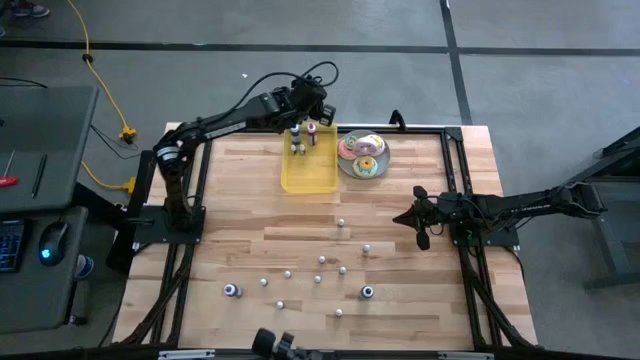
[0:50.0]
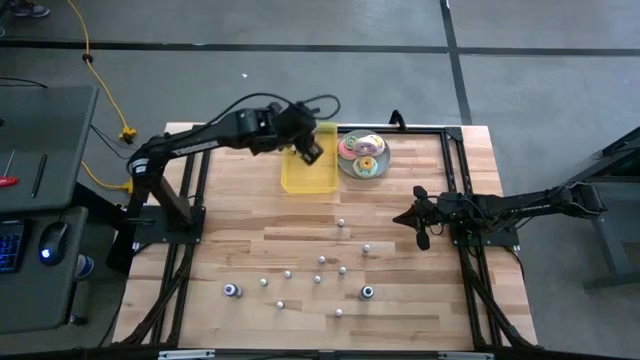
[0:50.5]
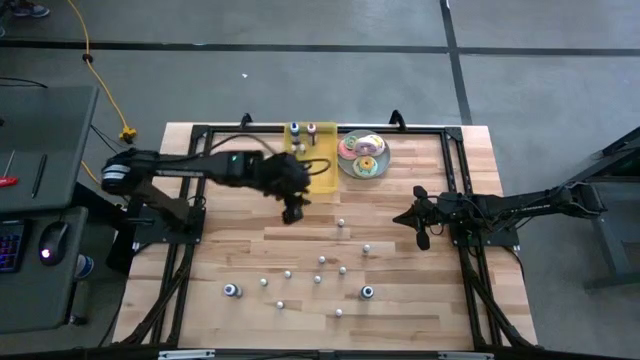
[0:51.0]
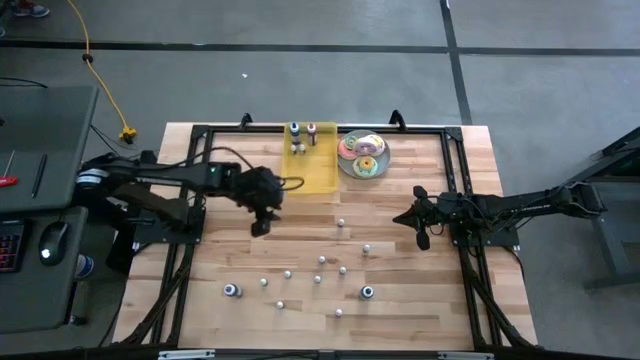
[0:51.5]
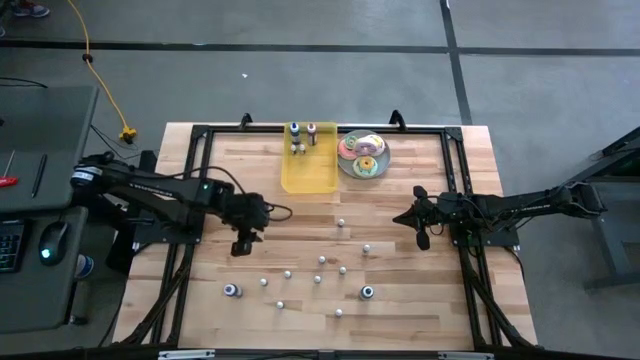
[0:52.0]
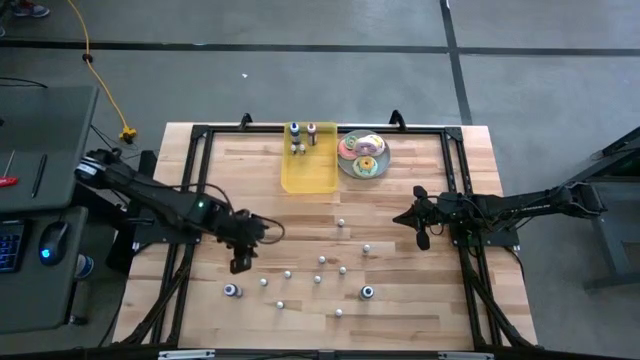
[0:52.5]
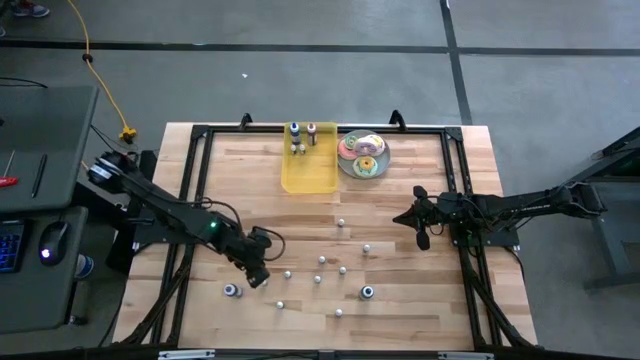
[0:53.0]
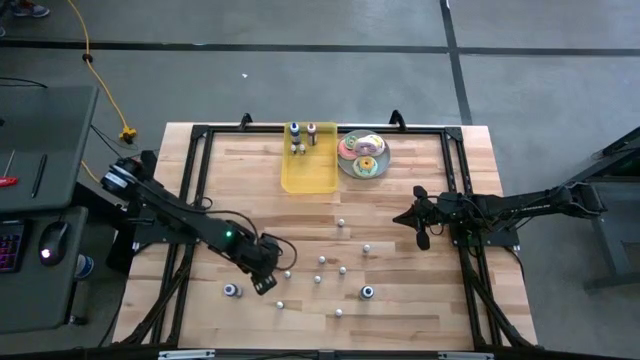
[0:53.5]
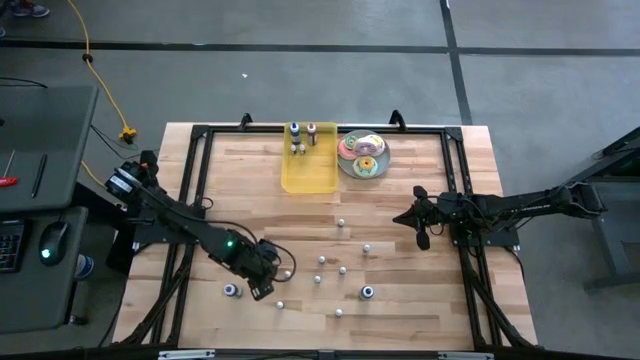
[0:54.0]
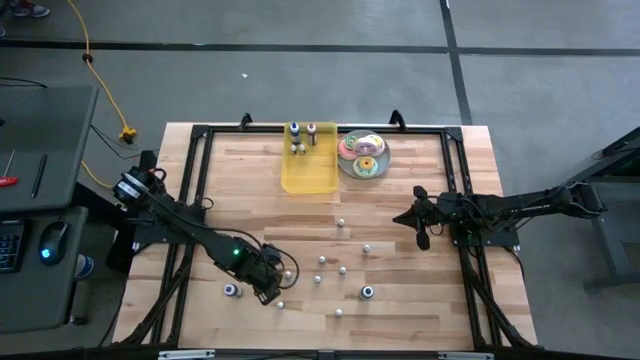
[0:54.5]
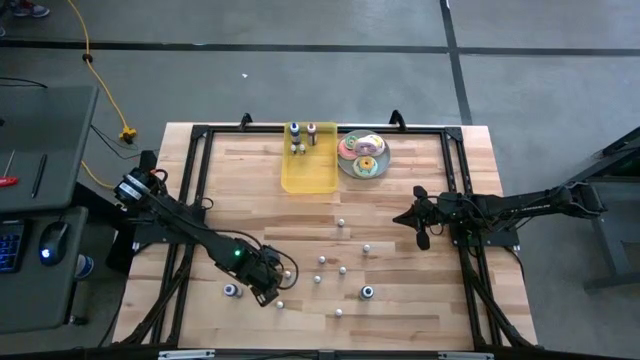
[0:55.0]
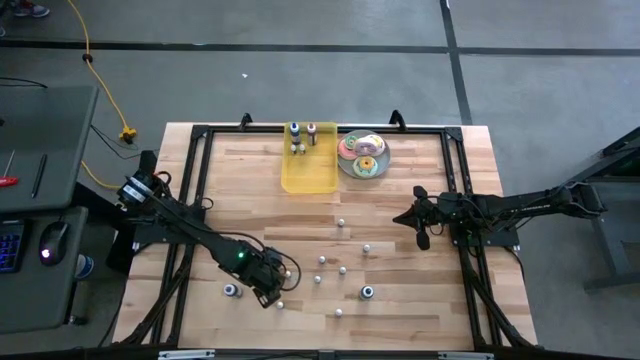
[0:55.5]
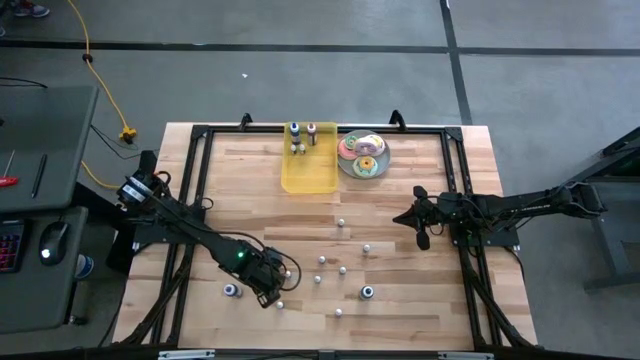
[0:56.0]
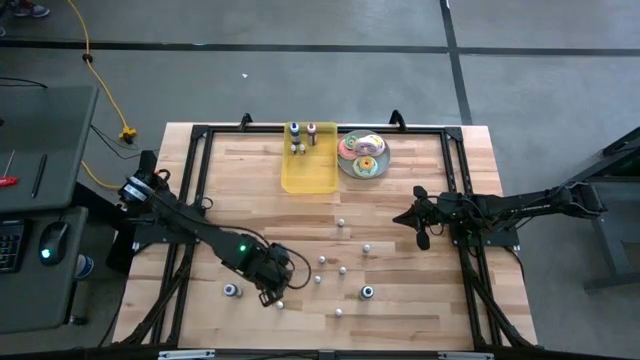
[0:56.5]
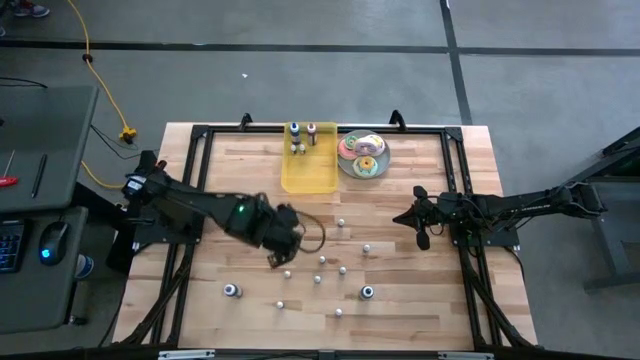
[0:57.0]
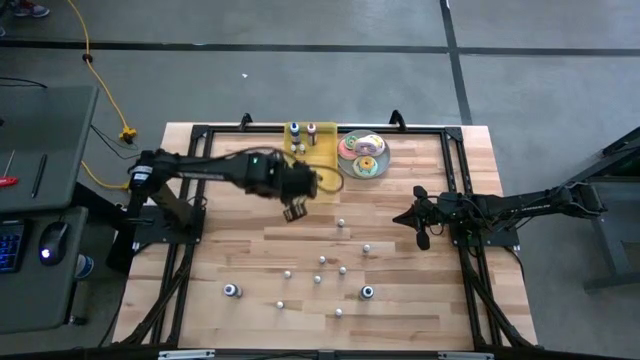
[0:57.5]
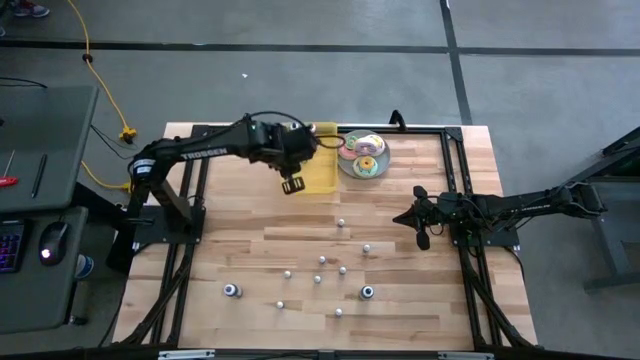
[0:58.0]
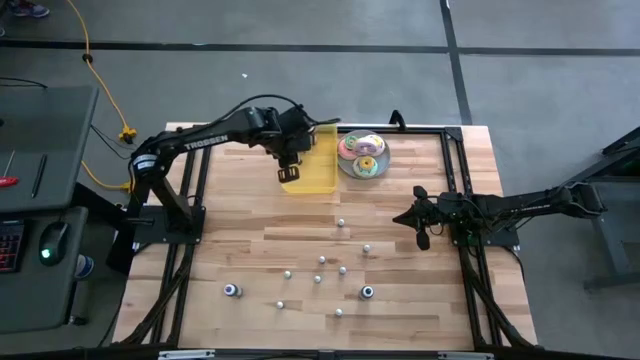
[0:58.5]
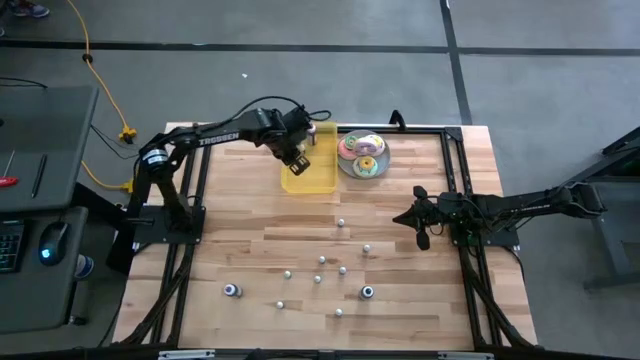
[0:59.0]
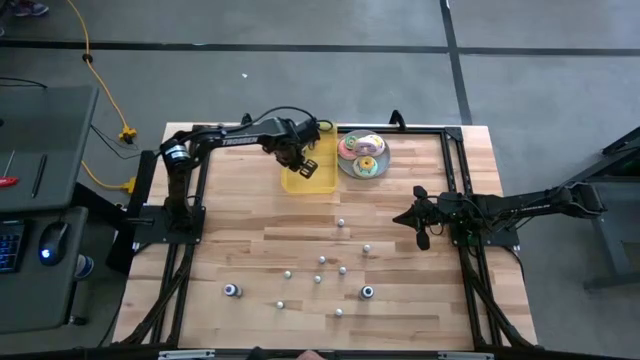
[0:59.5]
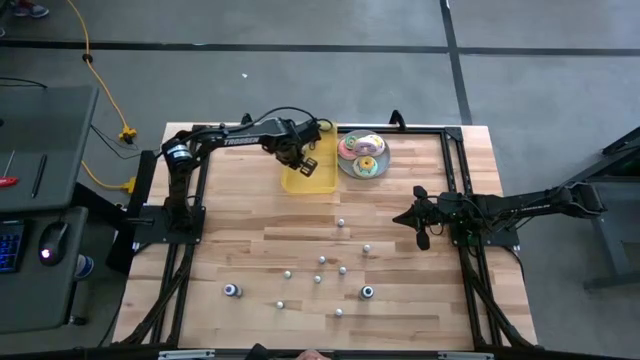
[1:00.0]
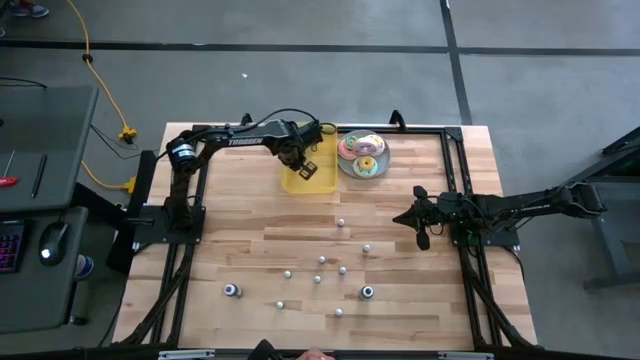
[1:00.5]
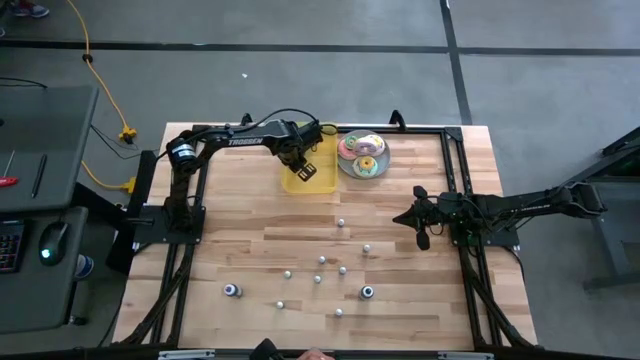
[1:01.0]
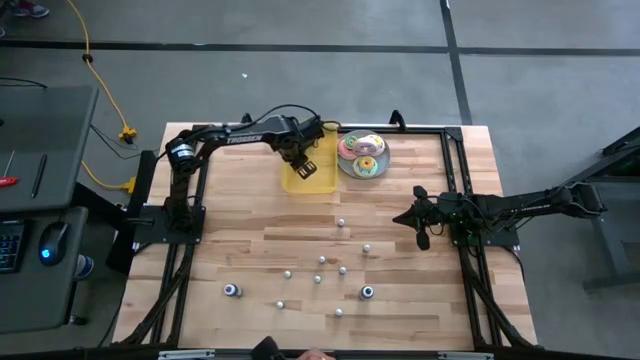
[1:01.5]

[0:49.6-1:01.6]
Task: Pick & Place food coloring
Put the small red food coloring bottle into the bin

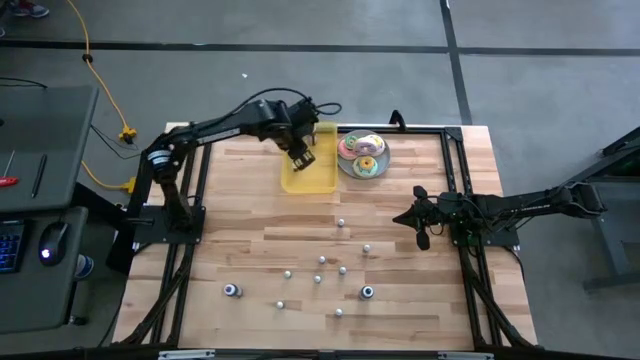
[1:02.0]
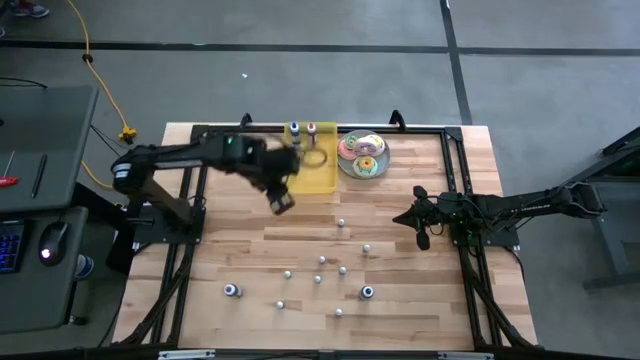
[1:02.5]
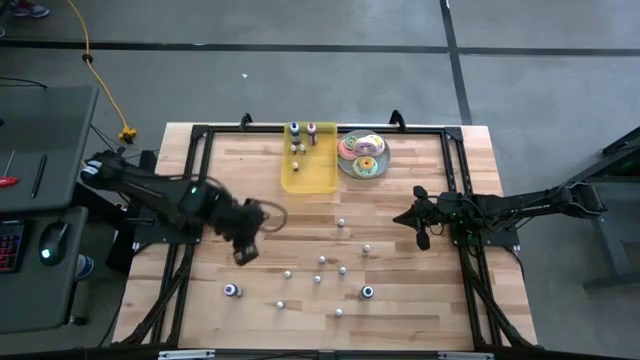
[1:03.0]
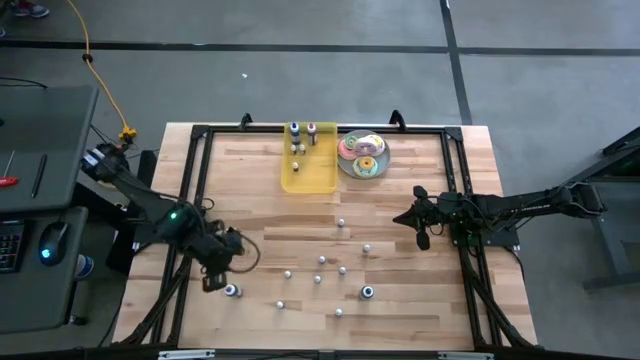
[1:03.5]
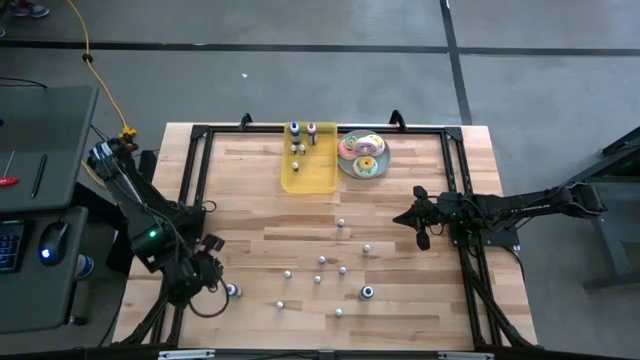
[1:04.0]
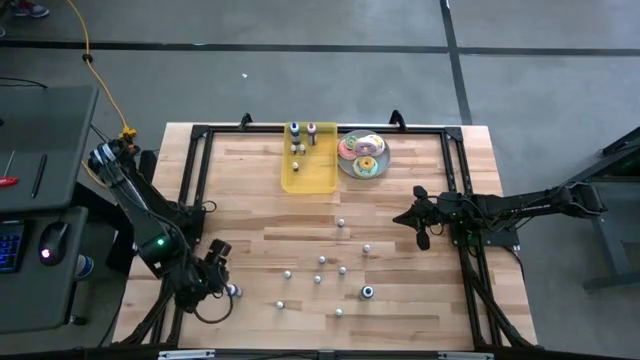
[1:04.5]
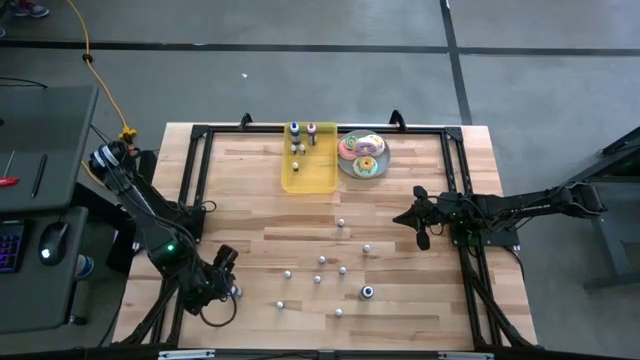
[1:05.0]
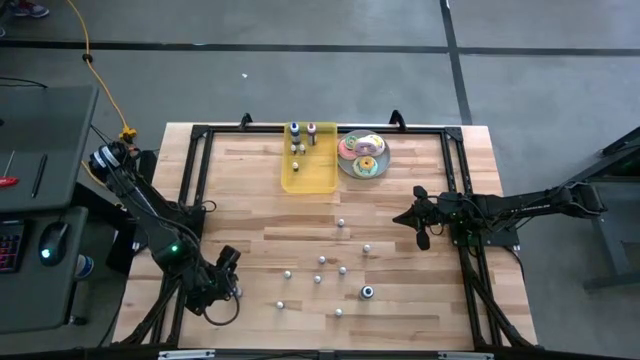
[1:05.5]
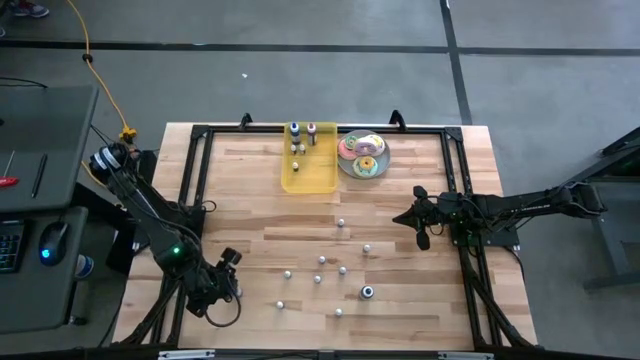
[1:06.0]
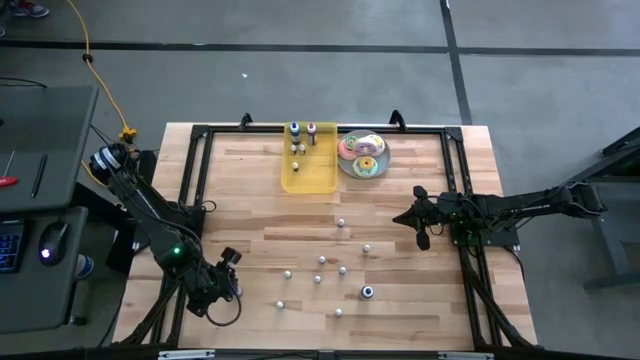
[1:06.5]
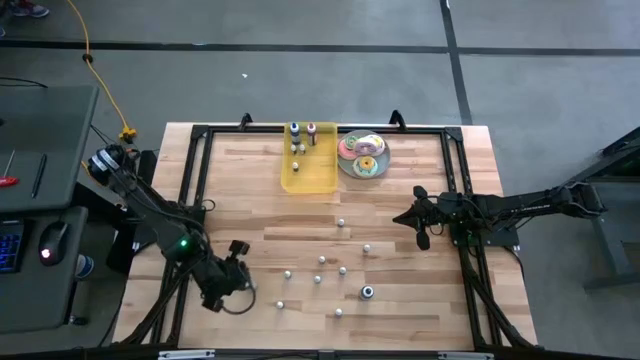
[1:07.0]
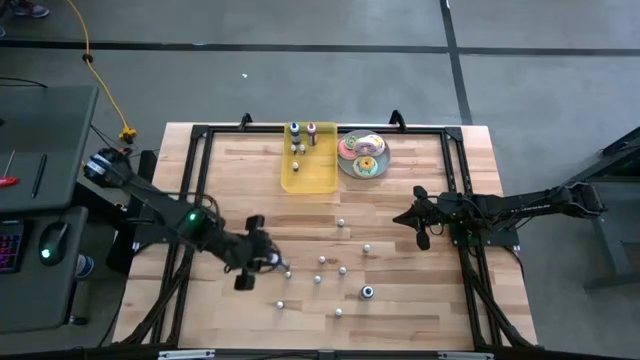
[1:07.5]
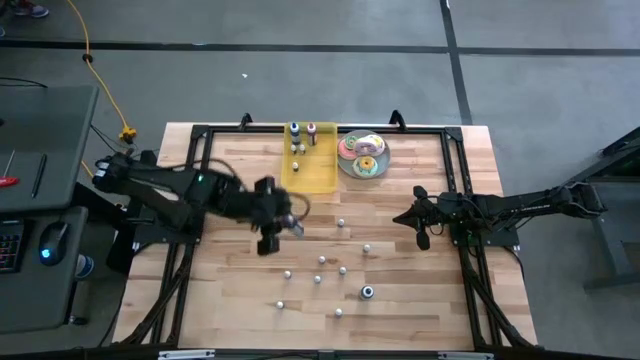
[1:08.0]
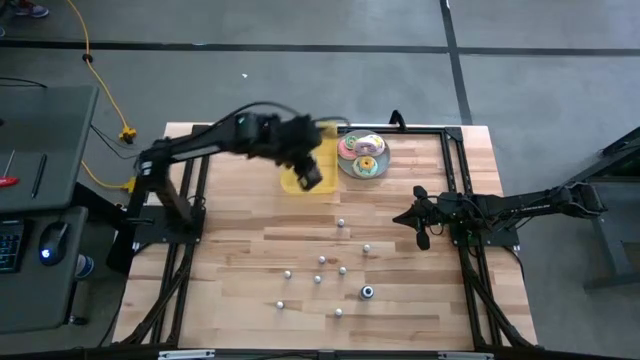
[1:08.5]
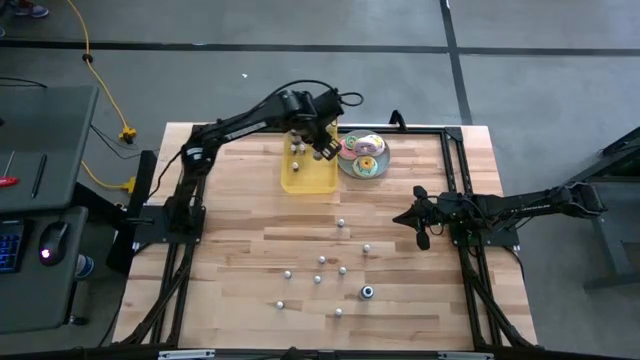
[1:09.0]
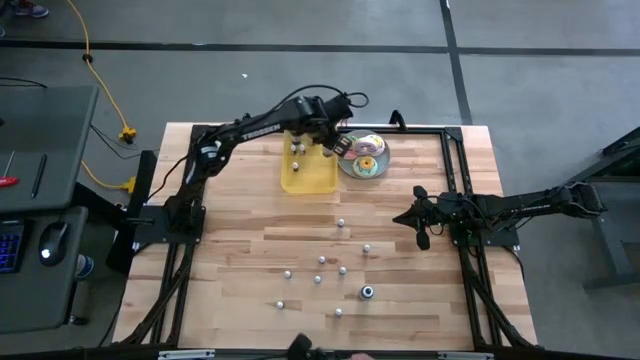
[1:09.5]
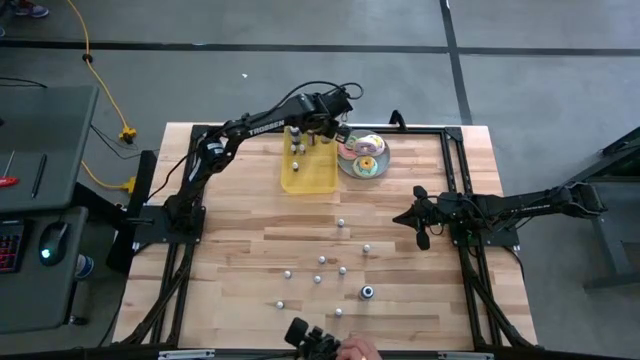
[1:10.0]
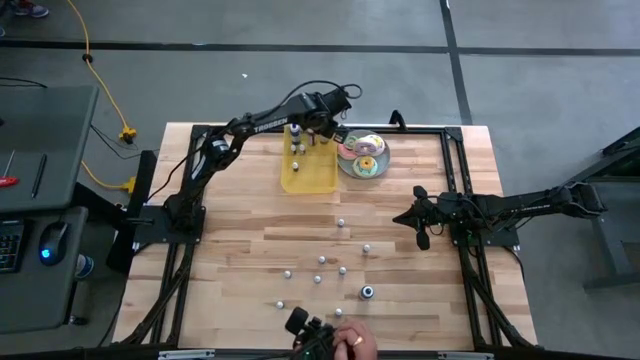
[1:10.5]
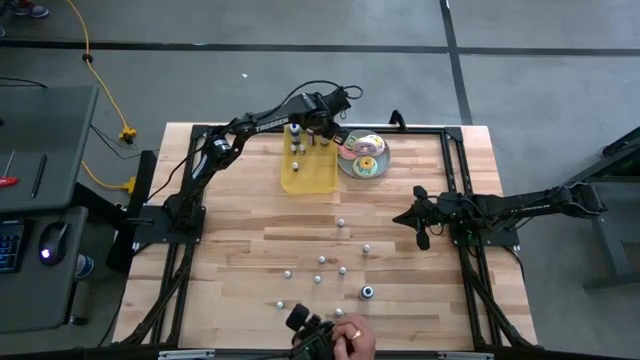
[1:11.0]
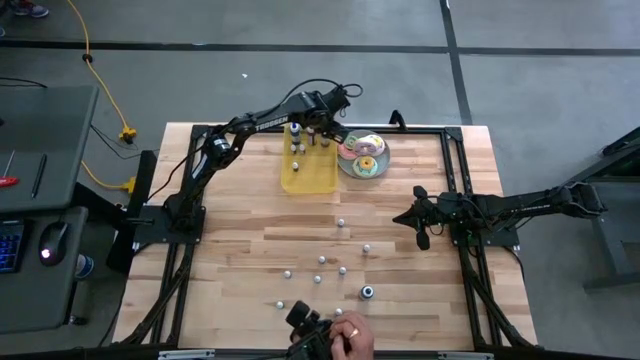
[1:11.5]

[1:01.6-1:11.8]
Put the big purple food coloring bottle into the bin
